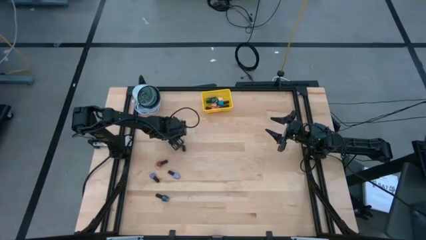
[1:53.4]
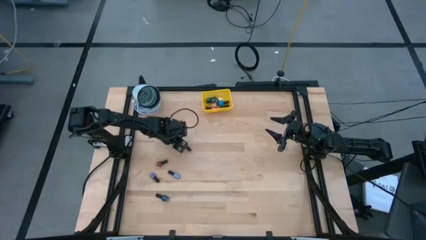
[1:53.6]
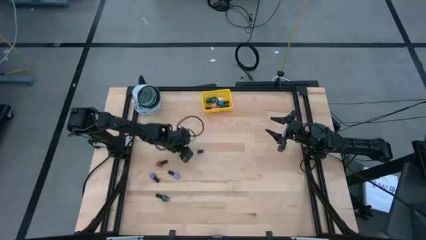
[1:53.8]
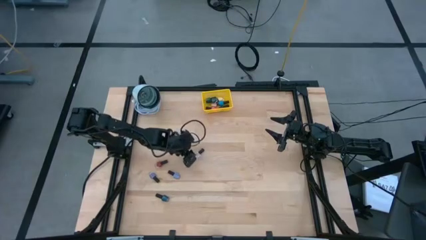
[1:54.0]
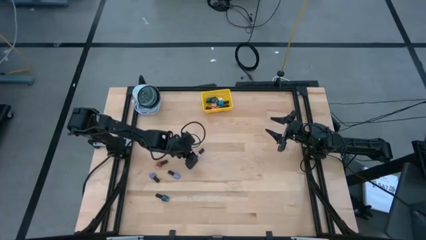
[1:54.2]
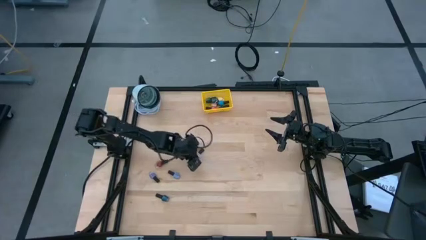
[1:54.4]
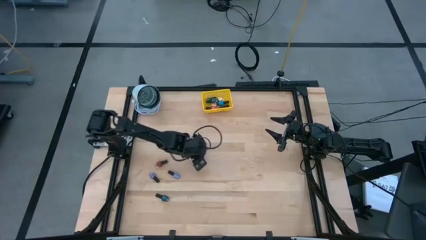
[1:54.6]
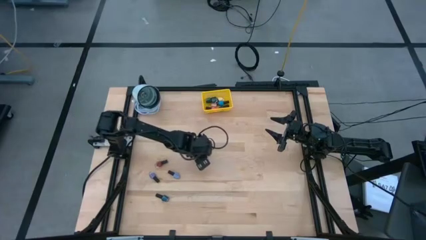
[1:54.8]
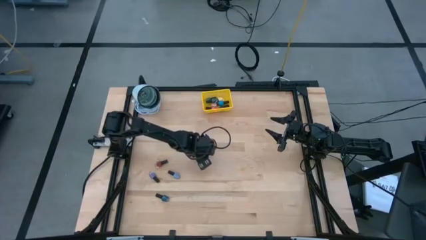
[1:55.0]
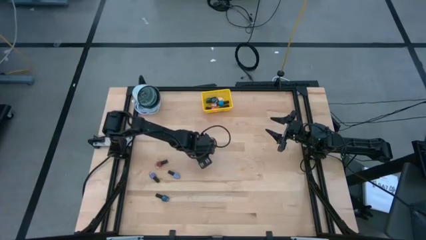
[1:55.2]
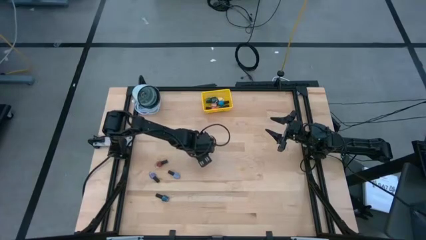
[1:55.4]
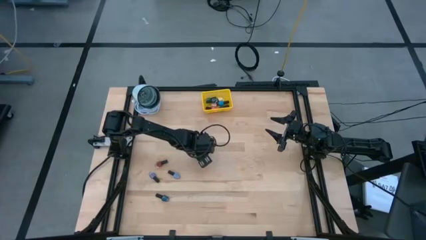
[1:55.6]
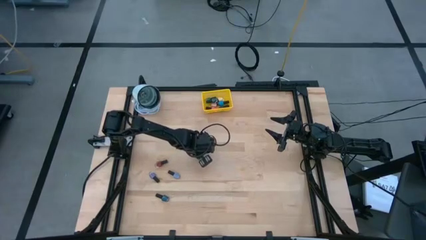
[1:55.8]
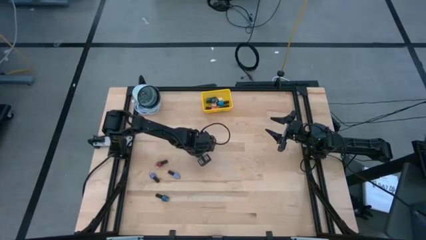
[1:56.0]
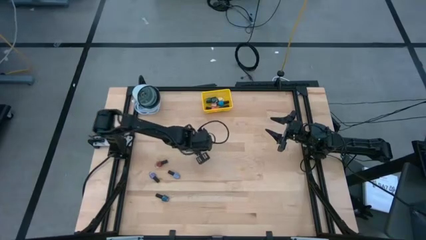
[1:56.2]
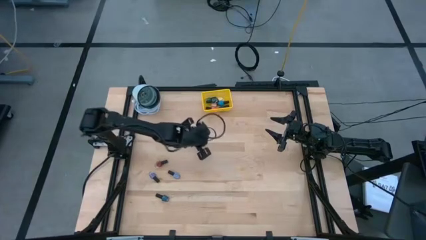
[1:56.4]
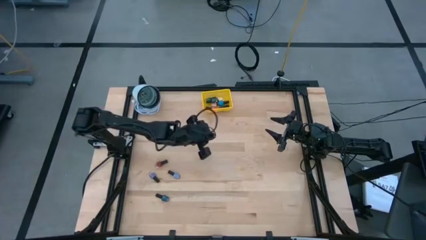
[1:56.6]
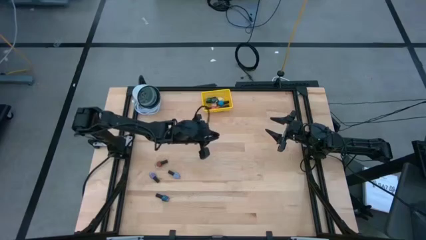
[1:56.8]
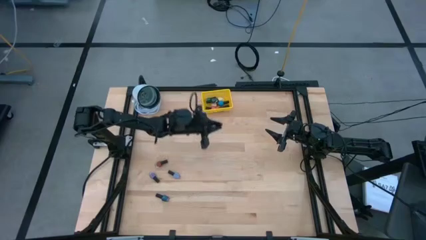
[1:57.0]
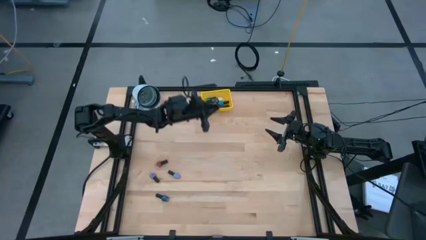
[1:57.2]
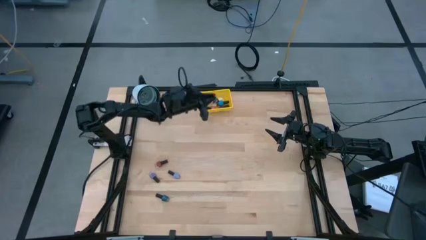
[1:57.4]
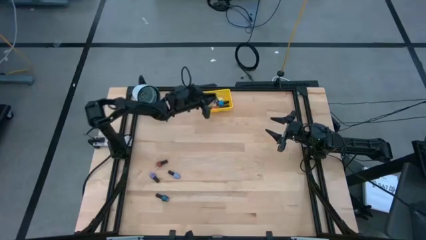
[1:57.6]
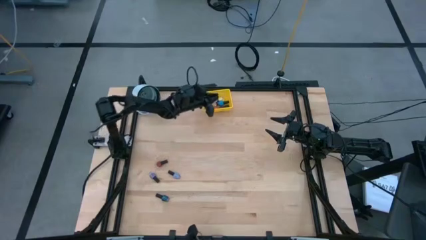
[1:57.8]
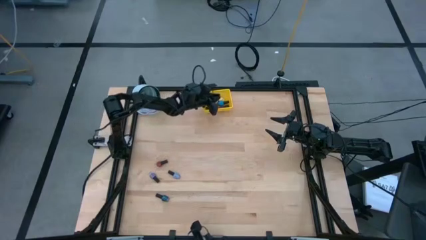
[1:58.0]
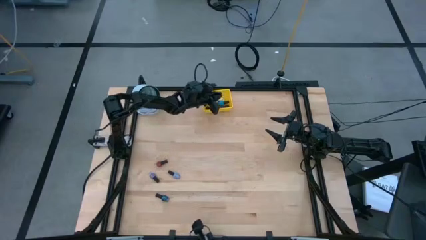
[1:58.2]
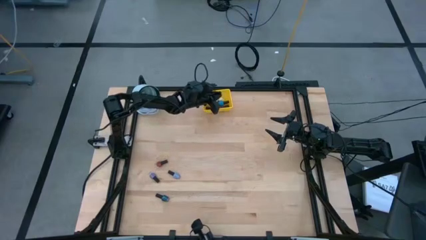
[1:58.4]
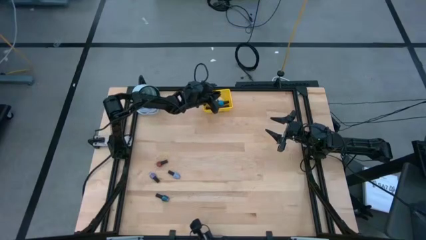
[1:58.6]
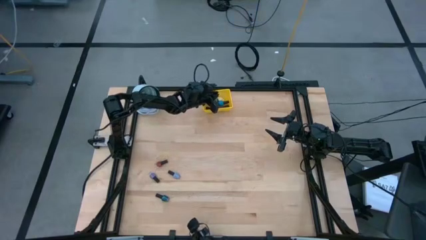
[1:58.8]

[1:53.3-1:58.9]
Task: Pick & Place Nail Polish
Put the white nail polish bottle into the yellow bin

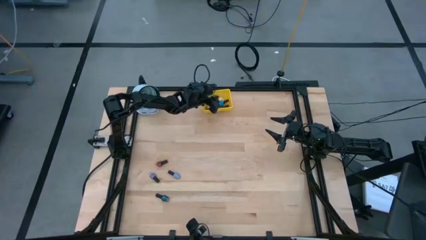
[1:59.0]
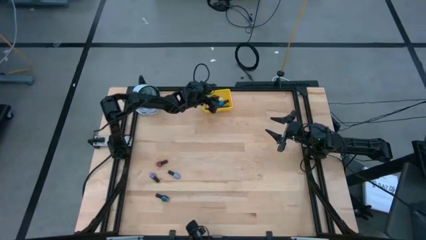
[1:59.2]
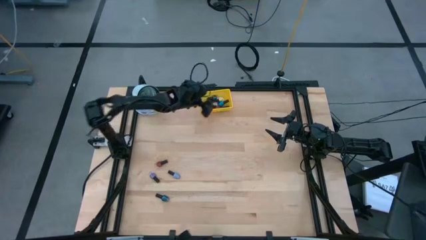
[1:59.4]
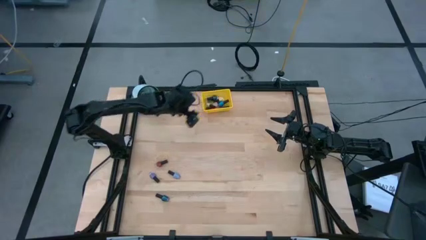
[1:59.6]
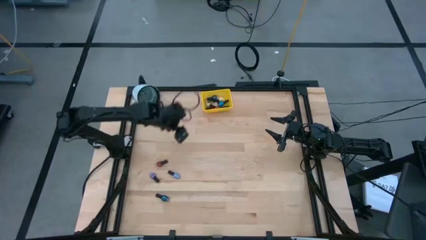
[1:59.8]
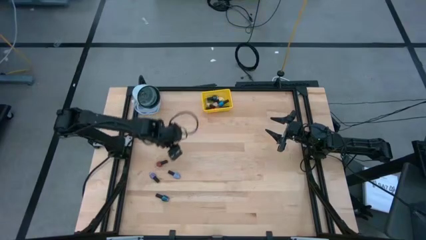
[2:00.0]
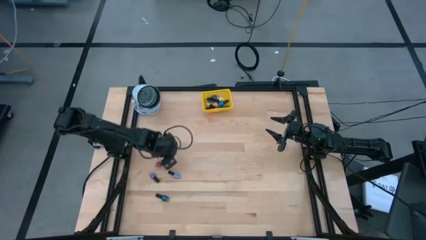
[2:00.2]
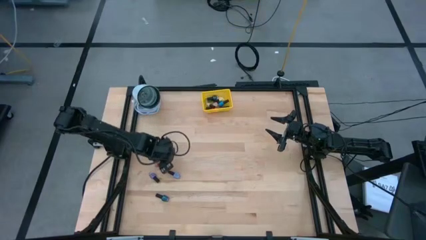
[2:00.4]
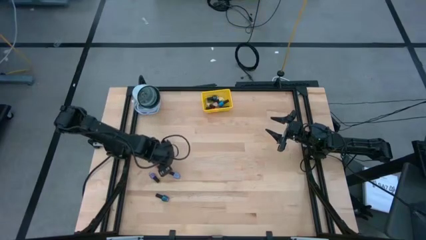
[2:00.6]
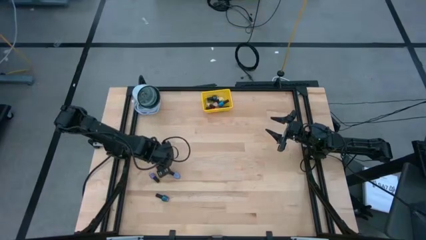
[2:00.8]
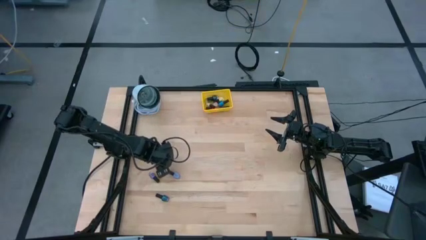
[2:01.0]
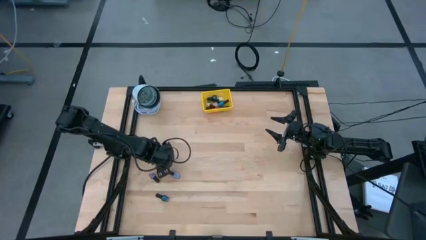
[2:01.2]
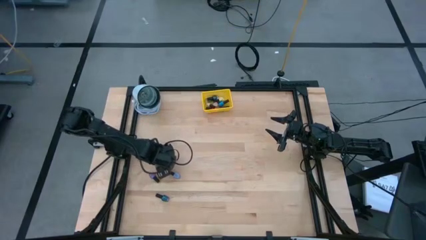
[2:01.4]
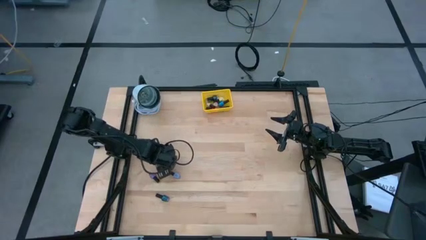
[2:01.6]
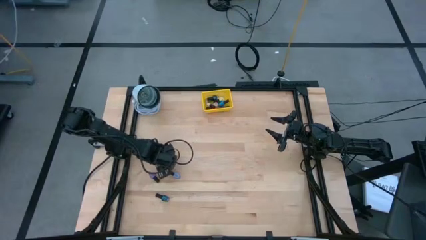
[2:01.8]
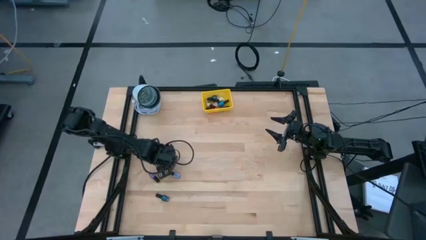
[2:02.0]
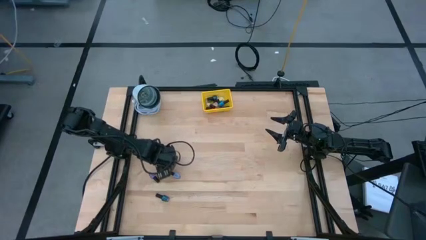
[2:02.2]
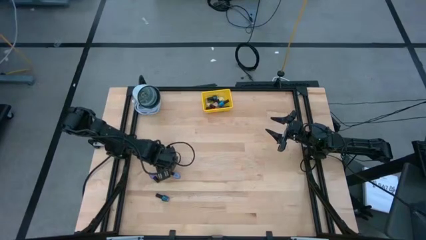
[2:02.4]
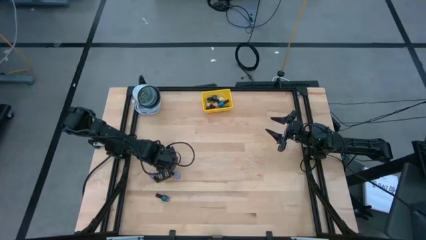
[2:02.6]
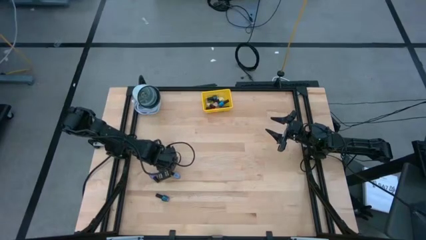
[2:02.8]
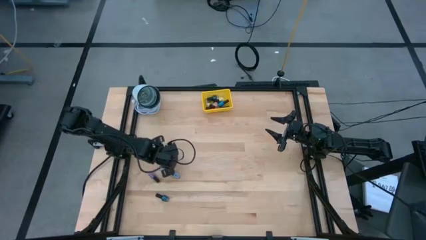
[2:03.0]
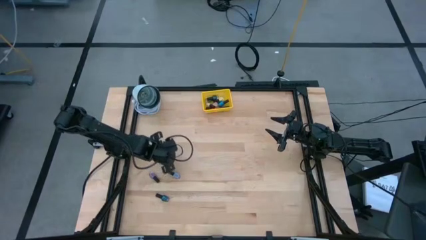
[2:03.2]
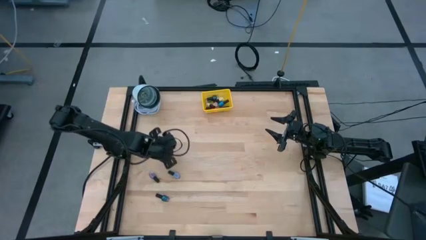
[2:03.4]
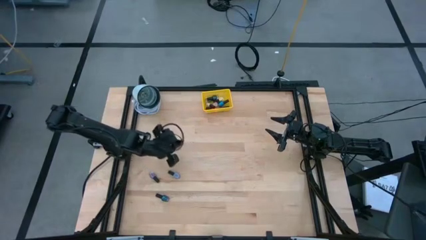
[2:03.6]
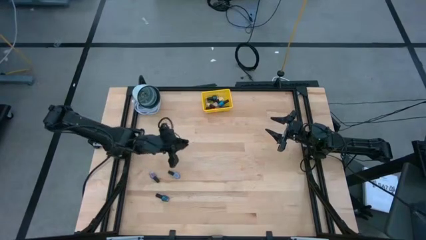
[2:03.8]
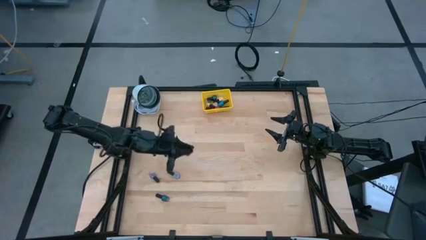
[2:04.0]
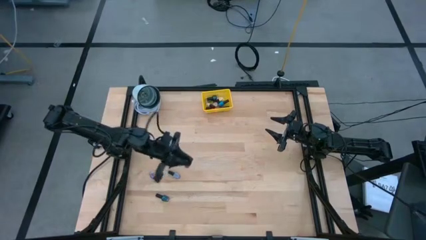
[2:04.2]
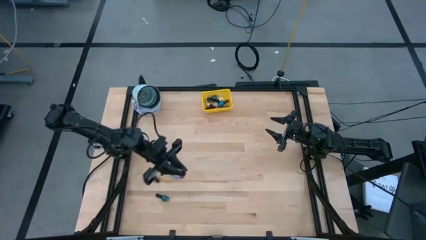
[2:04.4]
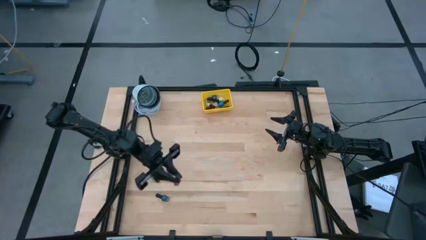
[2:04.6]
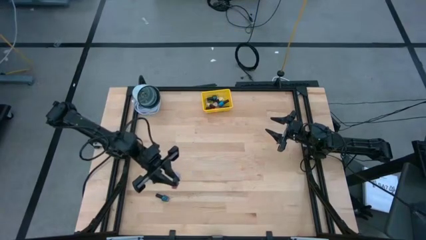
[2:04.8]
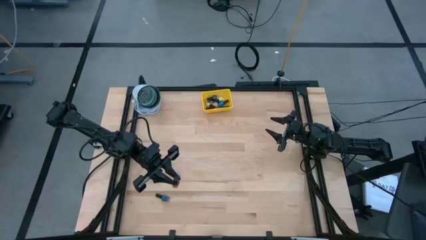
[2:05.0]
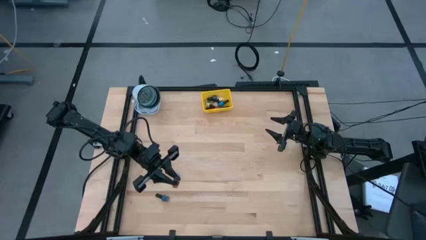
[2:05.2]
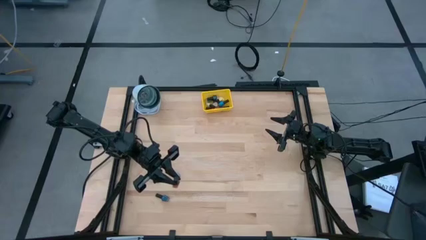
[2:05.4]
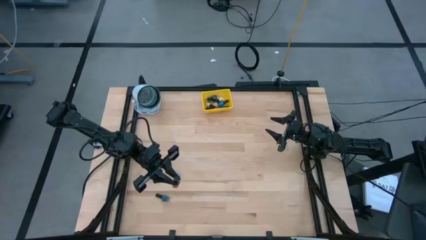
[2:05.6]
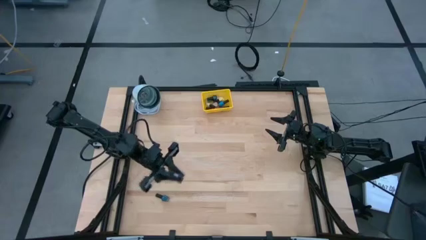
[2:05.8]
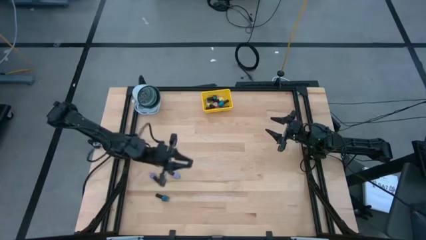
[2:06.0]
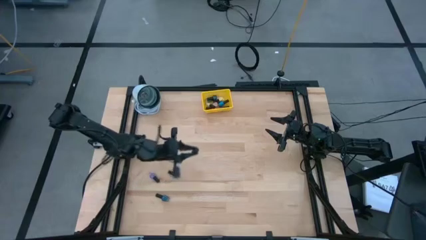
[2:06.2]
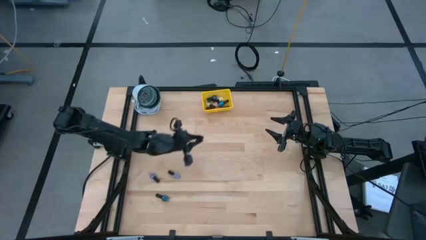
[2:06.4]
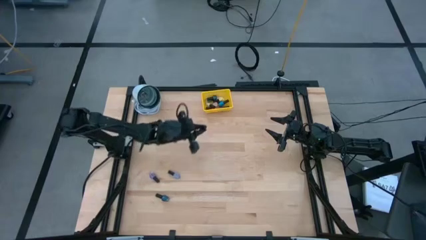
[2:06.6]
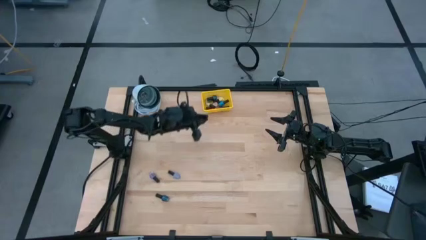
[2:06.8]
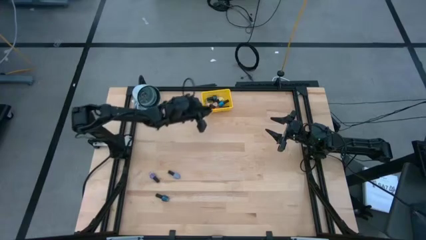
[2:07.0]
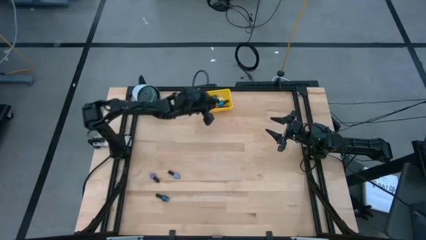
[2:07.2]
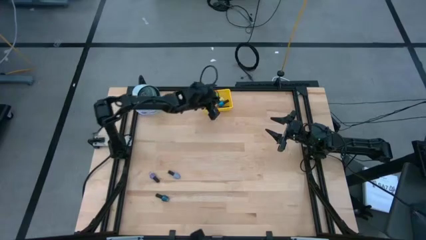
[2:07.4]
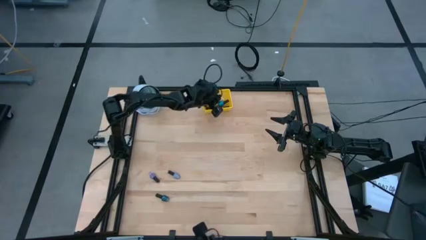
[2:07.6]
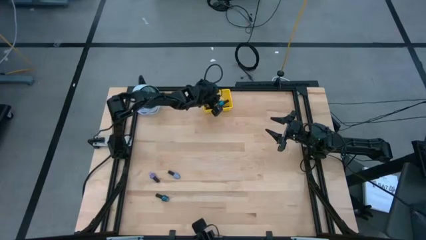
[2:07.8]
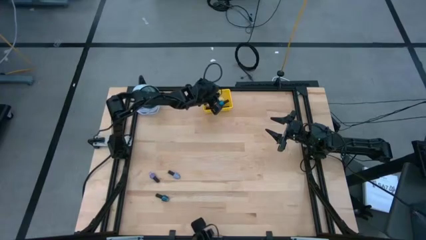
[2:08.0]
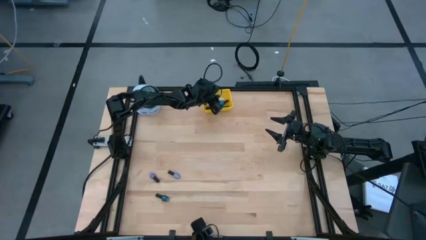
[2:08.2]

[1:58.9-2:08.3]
Put the red nail polish bottle into the yellow bin
